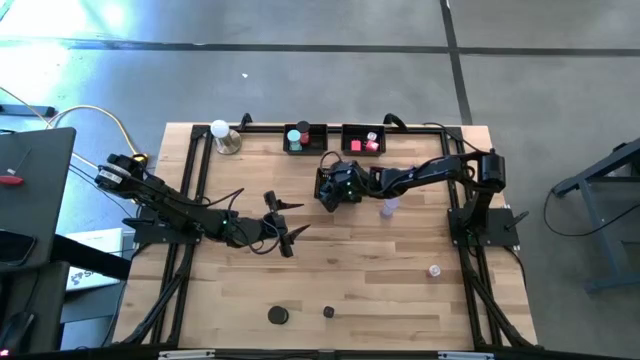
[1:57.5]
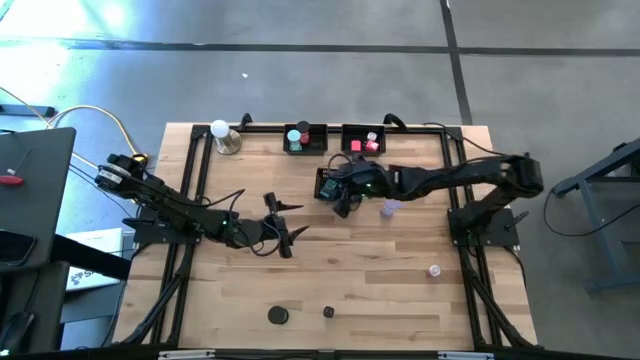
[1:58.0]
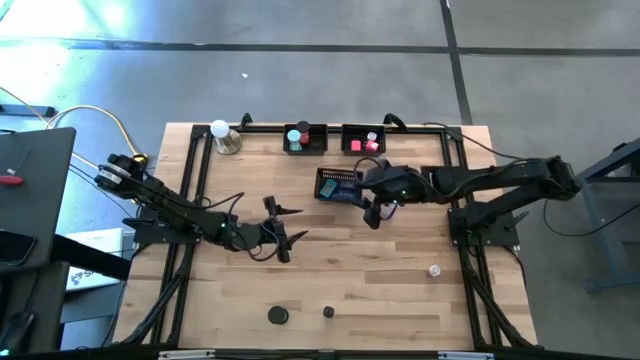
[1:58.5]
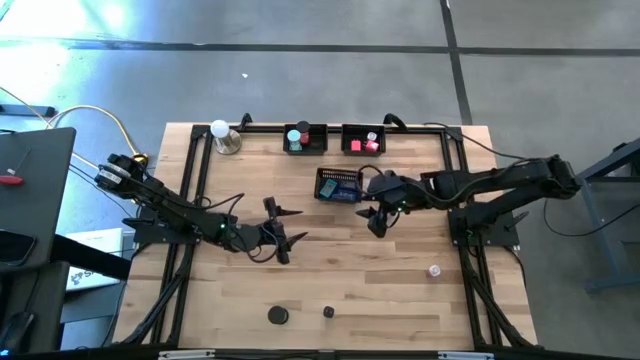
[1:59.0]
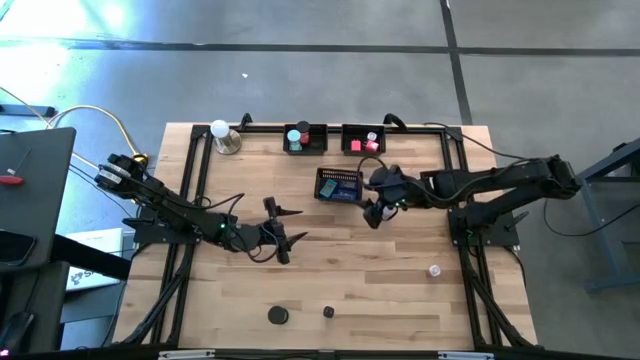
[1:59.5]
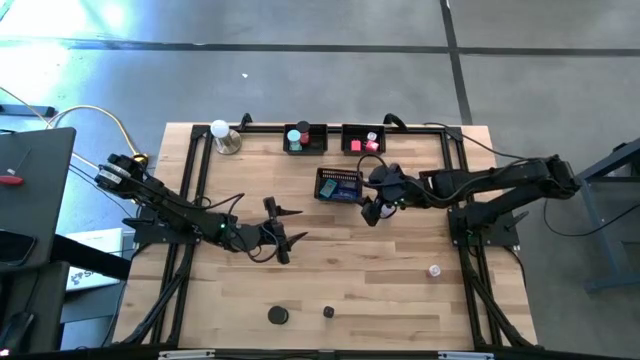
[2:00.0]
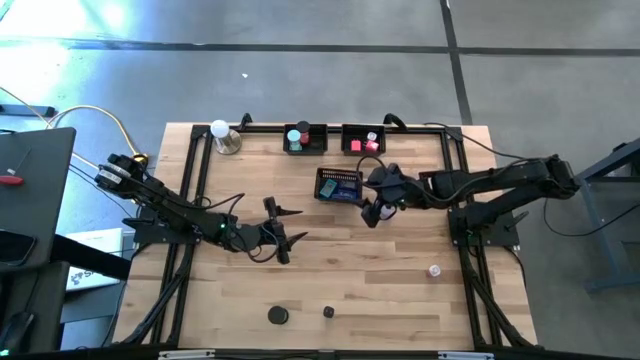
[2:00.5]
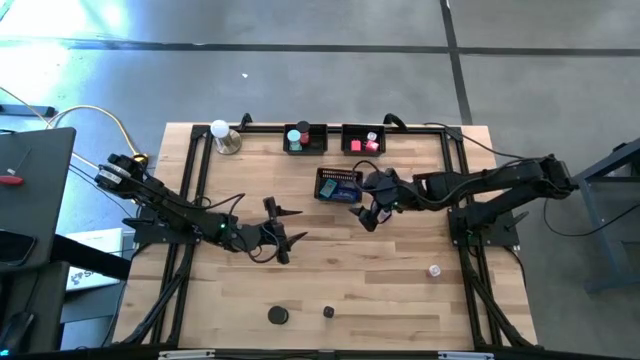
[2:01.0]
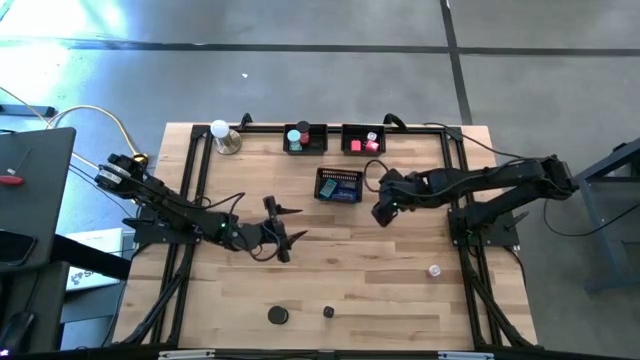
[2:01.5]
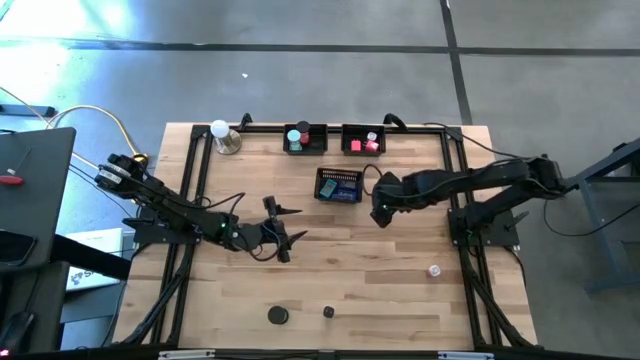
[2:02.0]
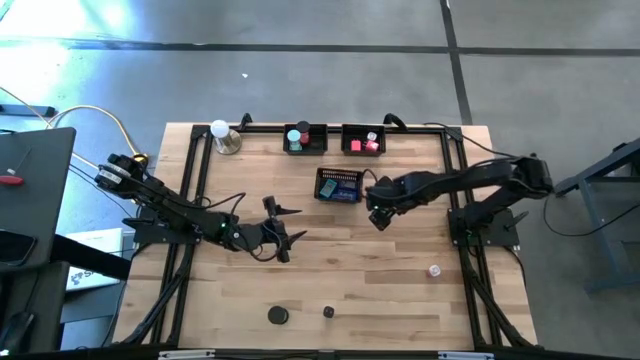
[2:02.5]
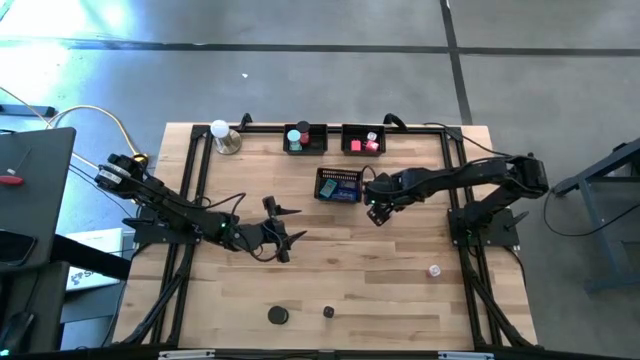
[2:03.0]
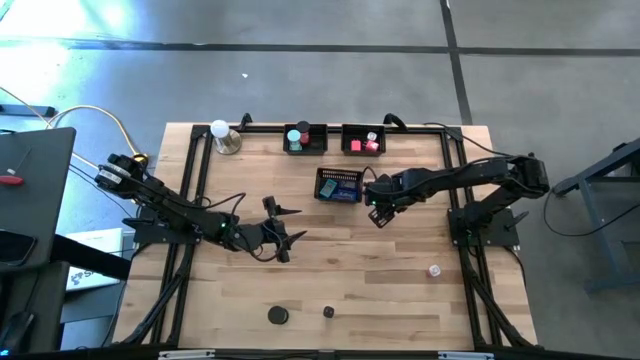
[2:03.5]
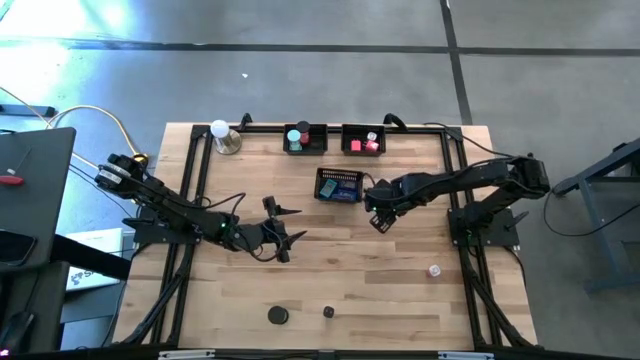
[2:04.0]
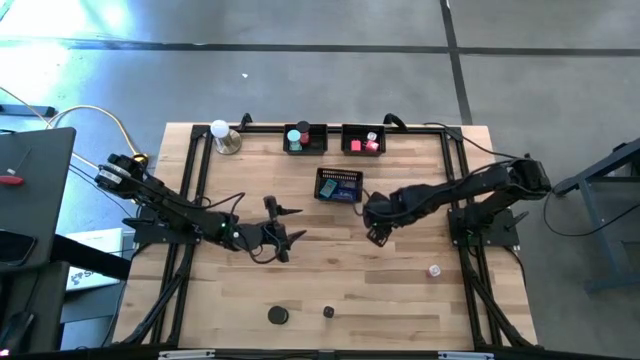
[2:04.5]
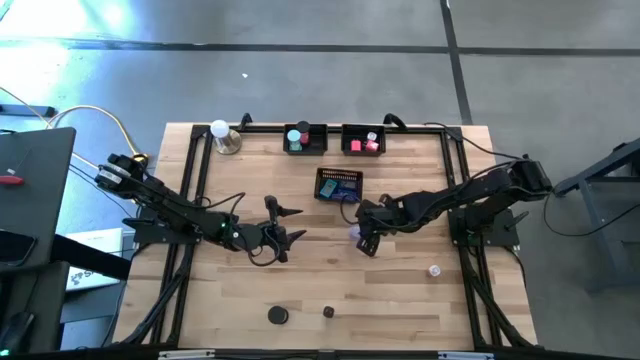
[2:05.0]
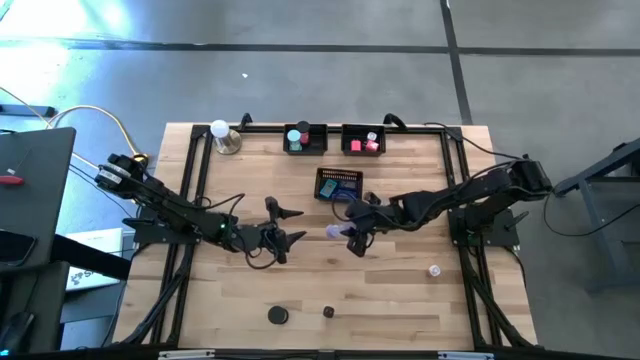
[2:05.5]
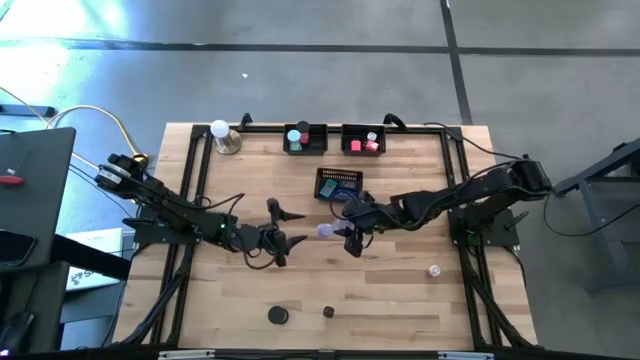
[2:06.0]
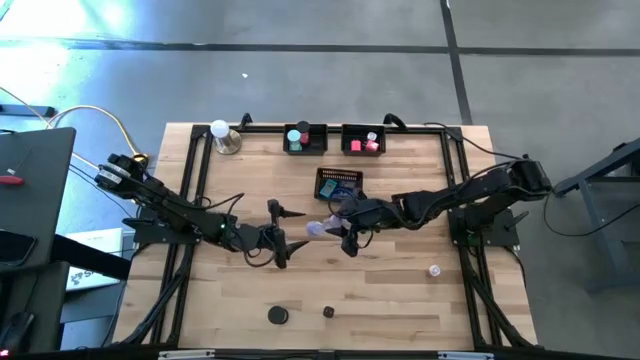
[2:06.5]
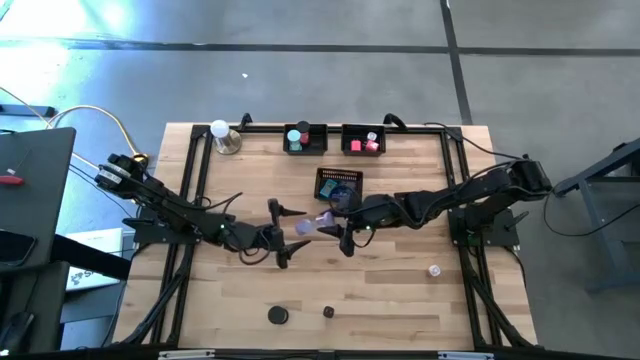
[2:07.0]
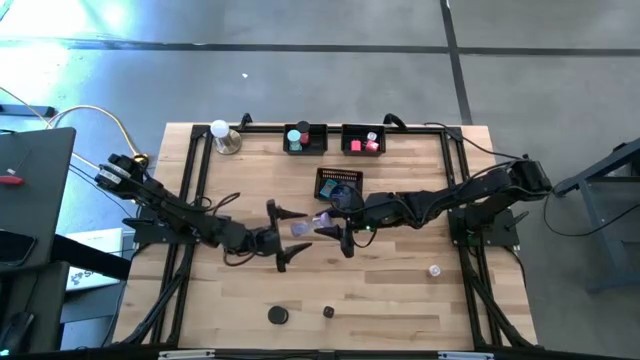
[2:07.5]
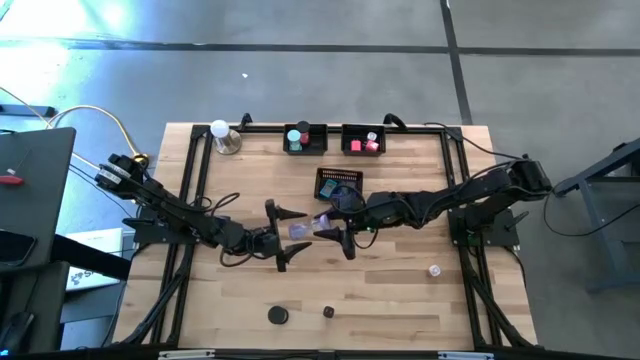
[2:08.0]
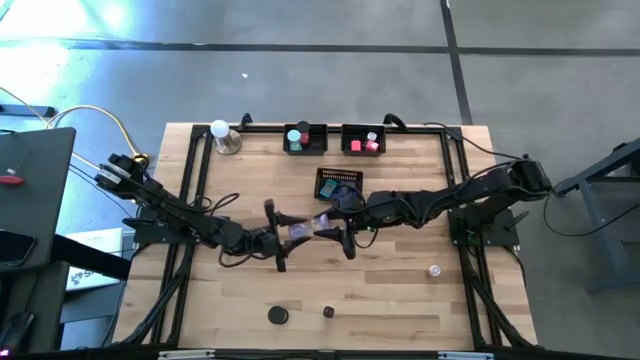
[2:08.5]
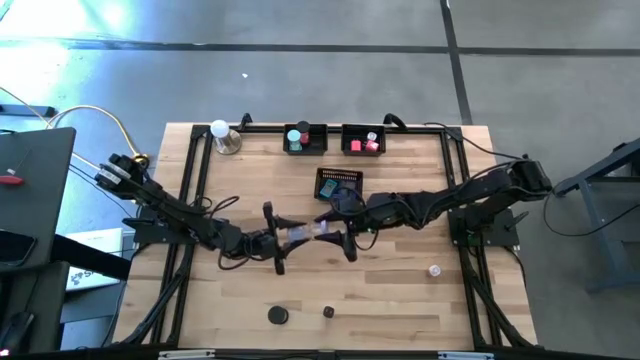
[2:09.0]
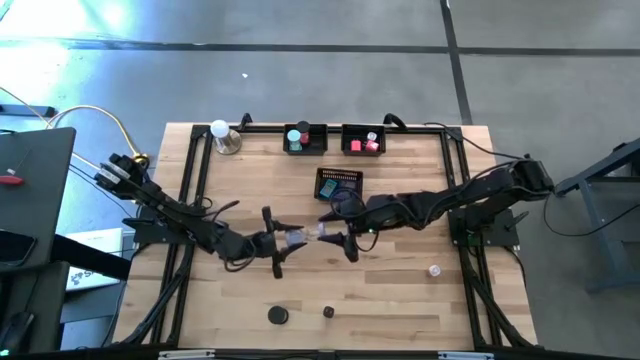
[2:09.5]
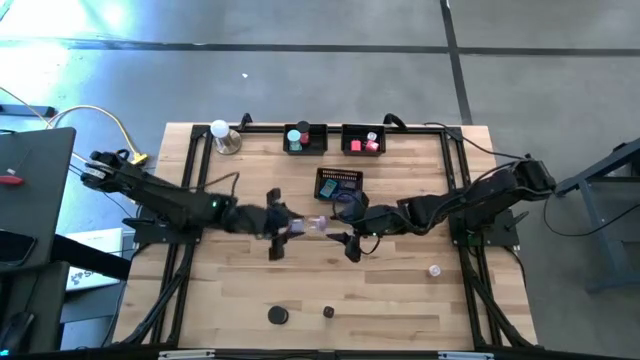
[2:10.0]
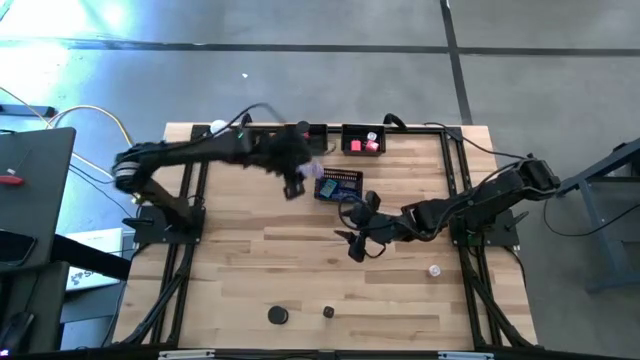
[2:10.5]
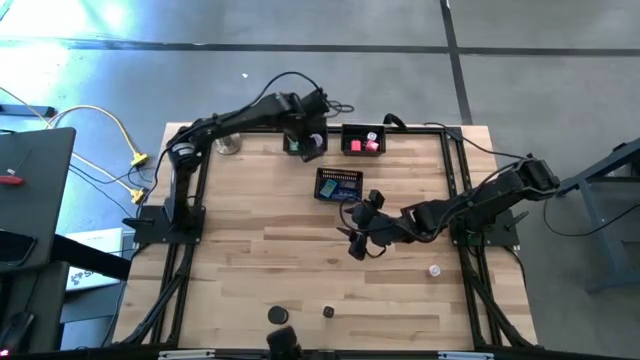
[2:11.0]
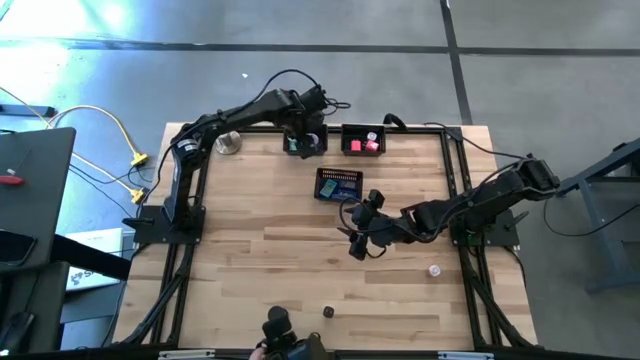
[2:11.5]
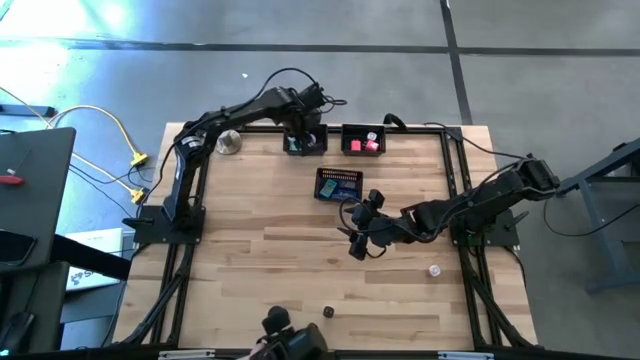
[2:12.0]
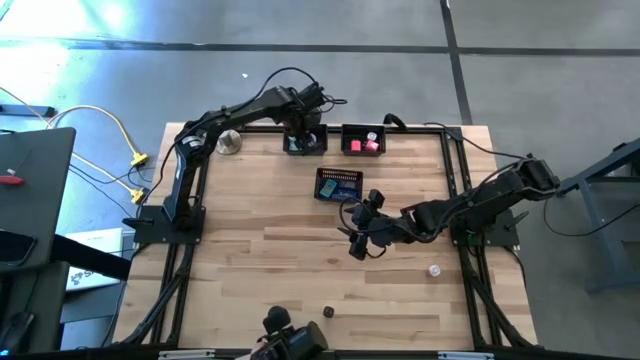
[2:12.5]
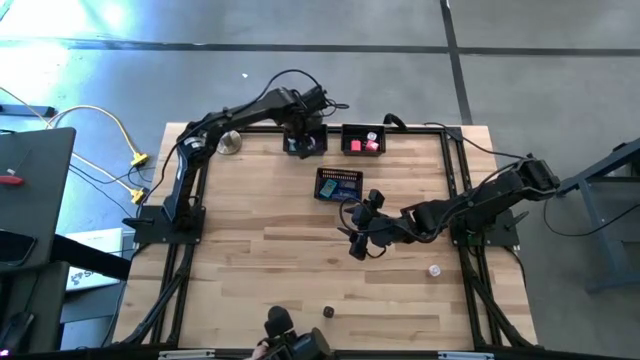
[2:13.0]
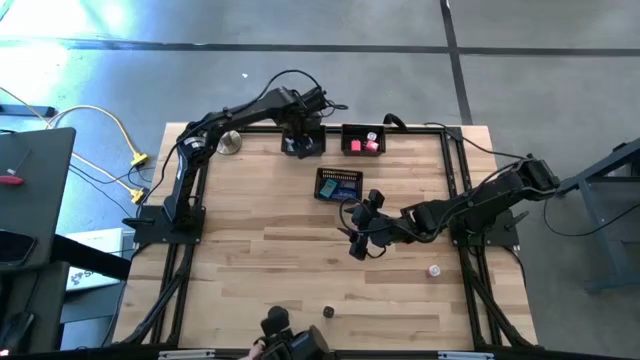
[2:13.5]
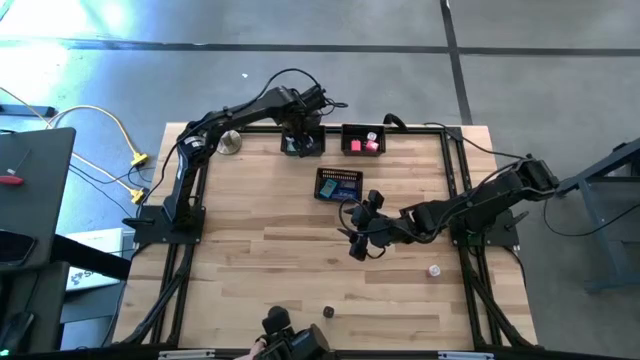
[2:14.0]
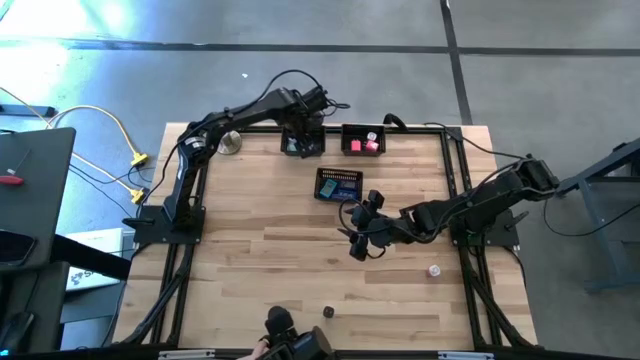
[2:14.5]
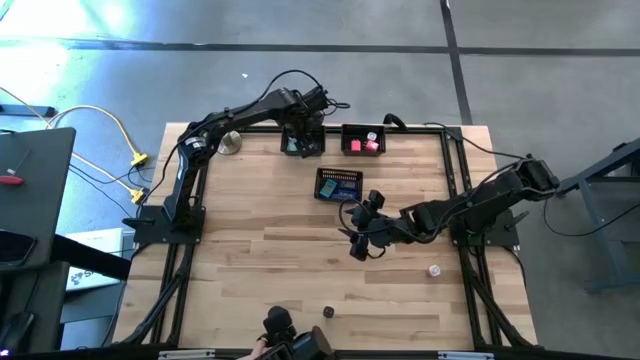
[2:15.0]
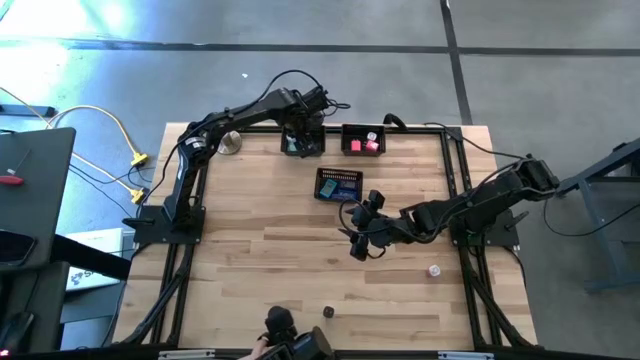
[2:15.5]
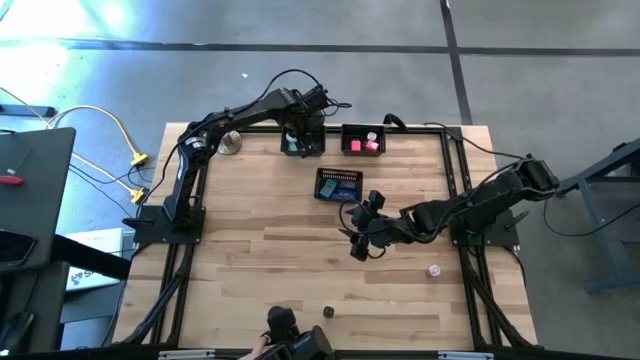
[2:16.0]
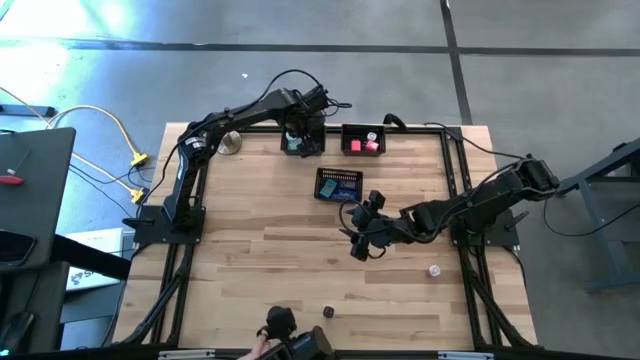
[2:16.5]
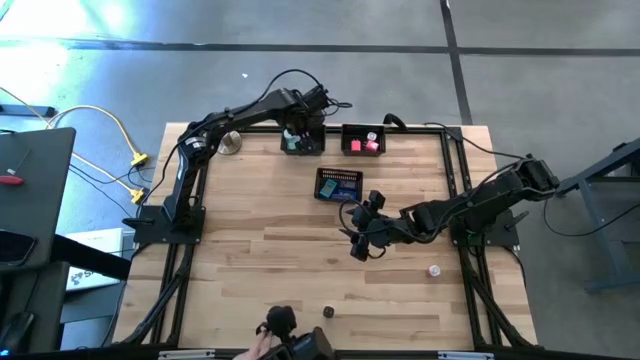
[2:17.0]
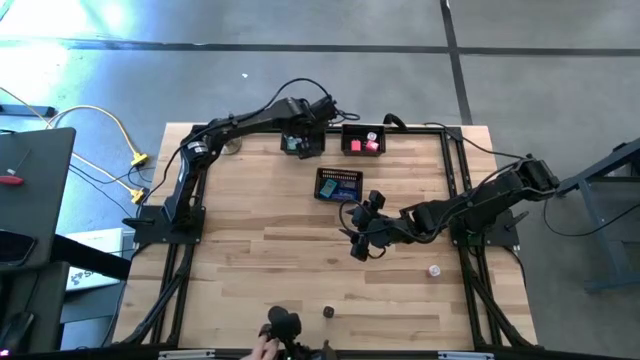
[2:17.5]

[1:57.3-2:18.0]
Task: Pick & Place Office items
Put the purple hourglass into the top left black bin
